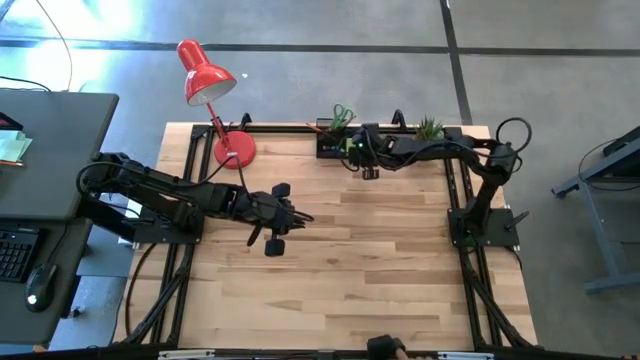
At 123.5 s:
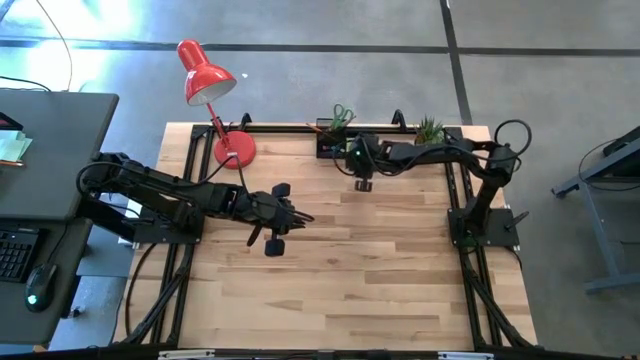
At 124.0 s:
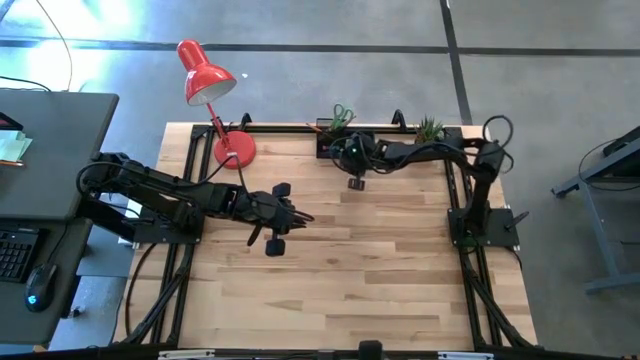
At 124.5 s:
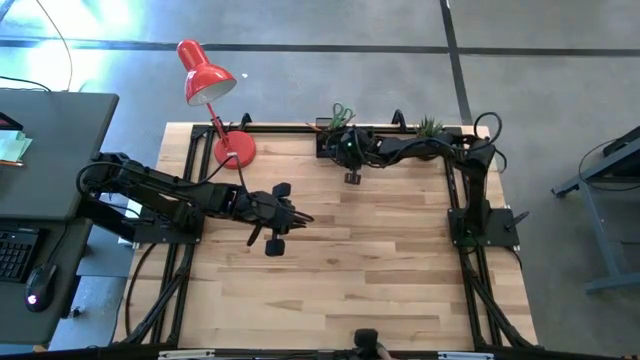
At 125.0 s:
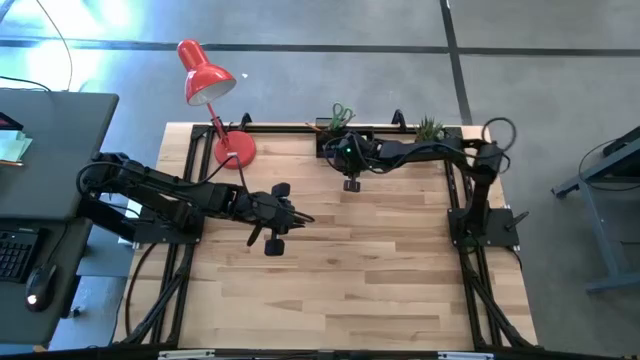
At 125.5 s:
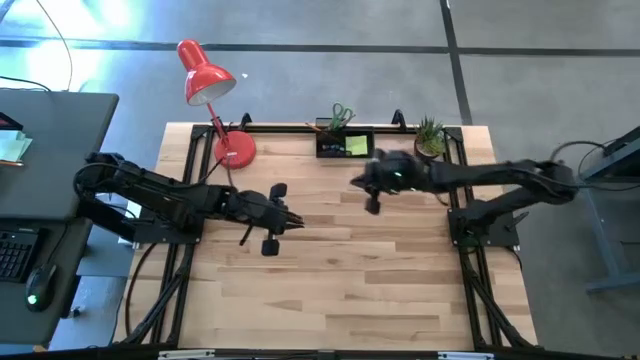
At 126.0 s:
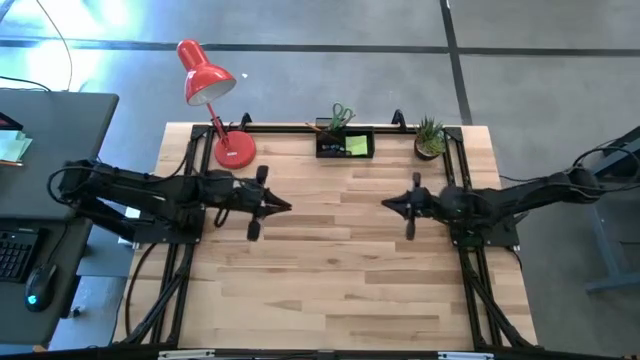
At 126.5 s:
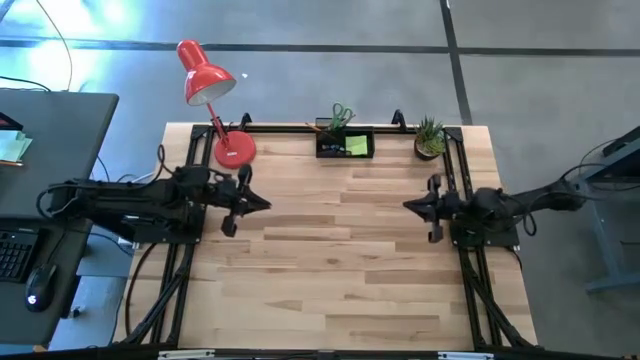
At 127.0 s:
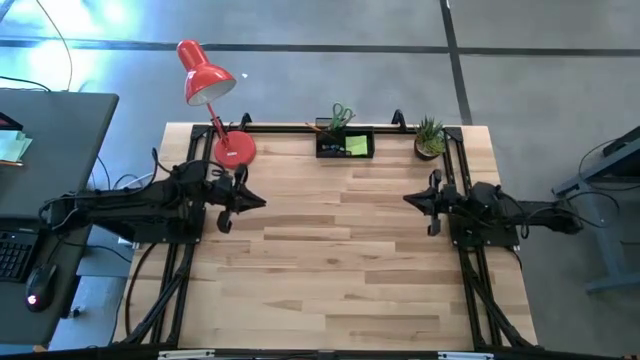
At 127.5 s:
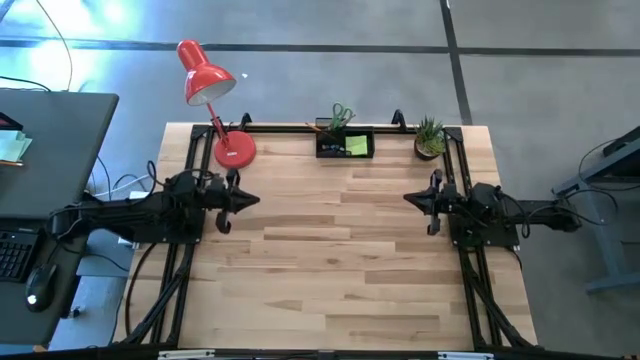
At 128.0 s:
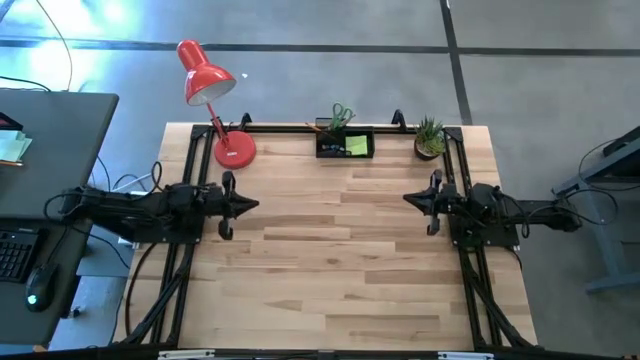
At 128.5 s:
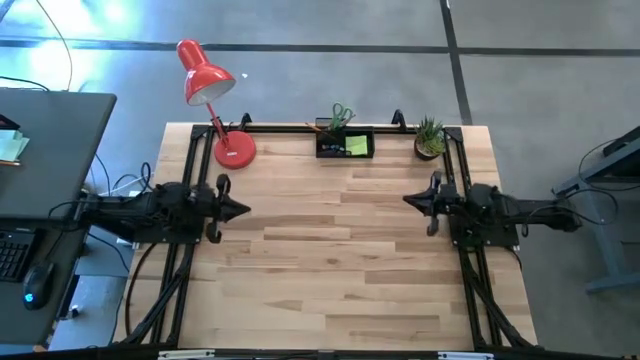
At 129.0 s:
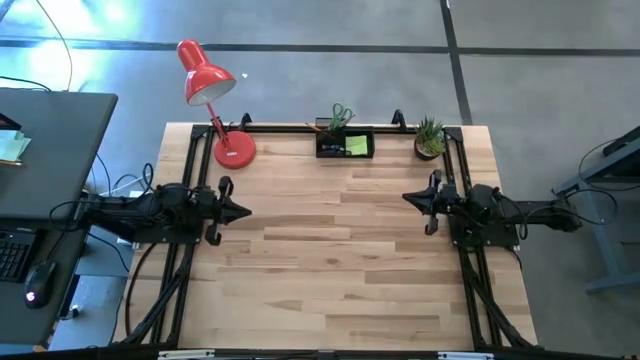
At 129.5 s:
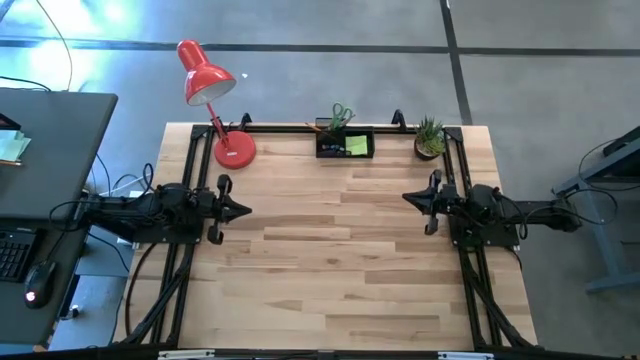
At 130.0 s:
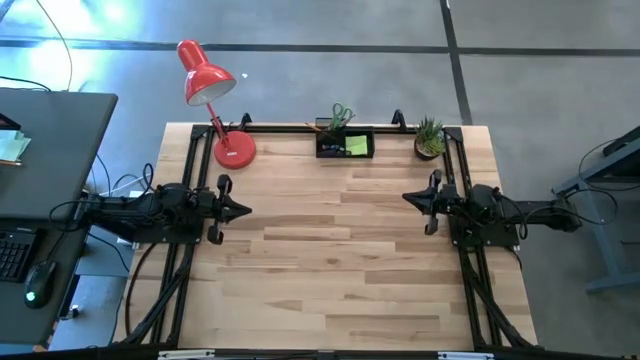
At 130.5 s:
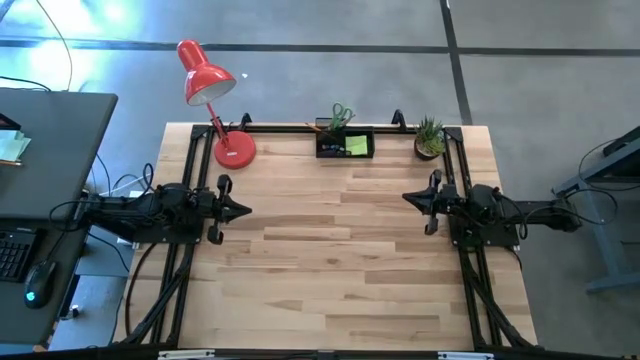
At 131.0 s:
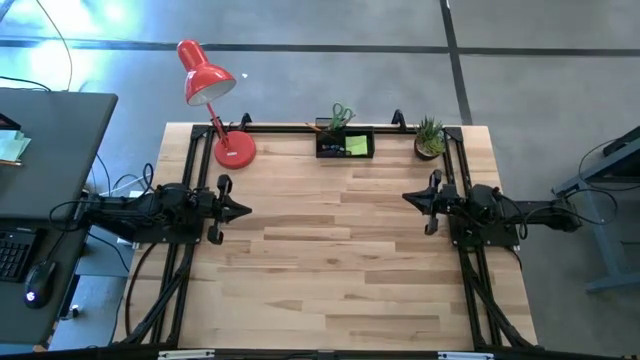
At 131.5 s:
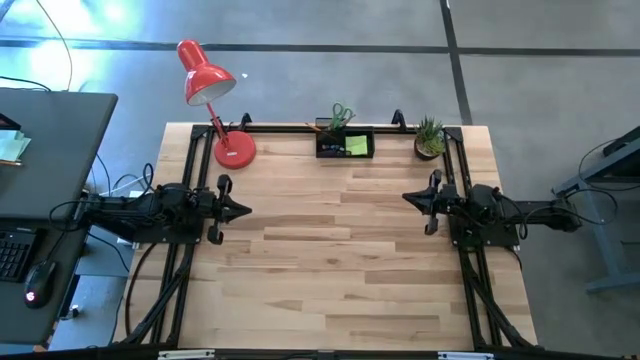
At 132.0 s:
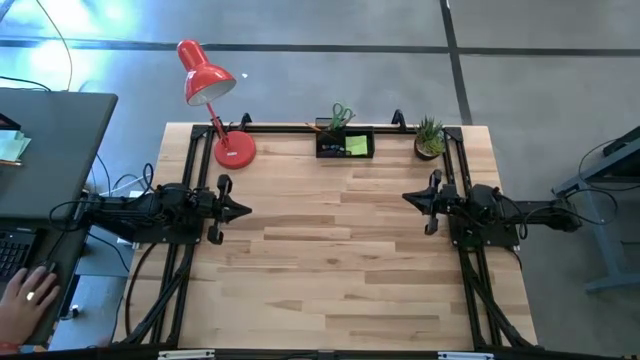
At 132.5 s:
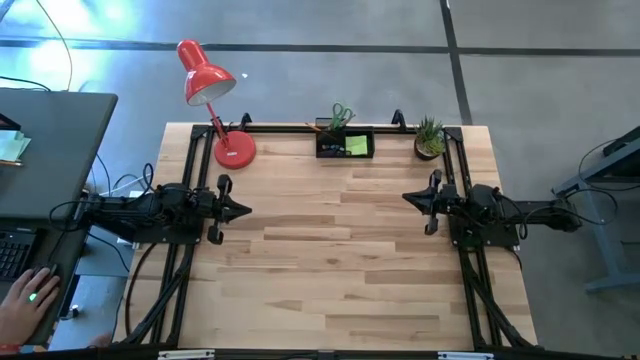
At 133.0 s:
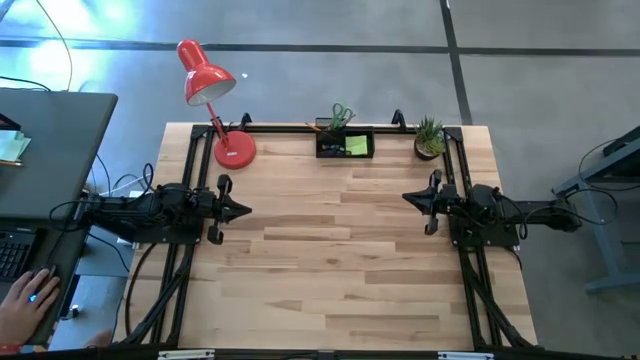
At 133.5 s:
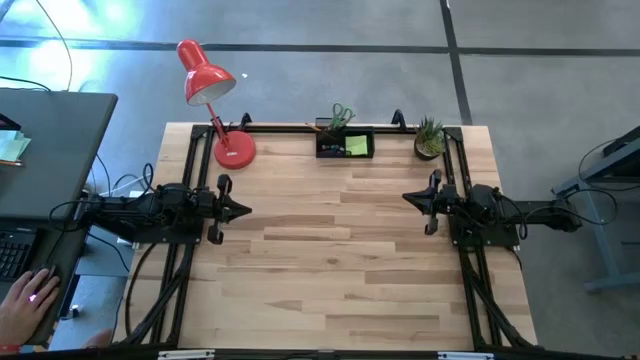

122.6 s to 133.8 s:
Task: Pick and place office supplies into organizer
Return to Home Position

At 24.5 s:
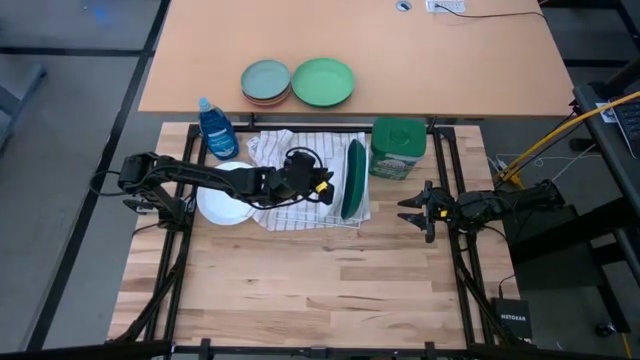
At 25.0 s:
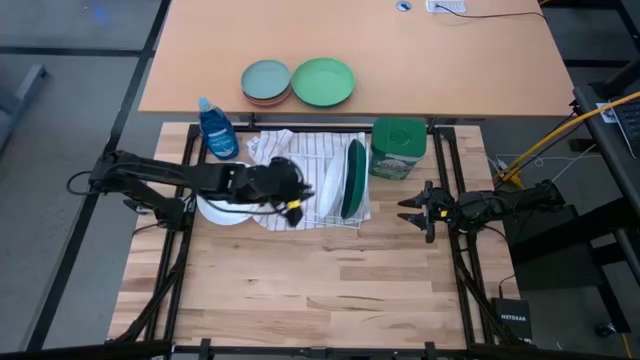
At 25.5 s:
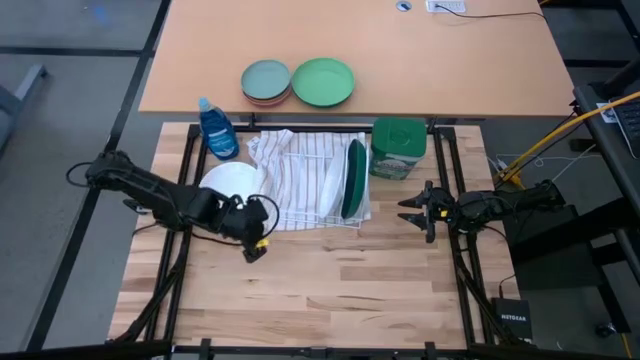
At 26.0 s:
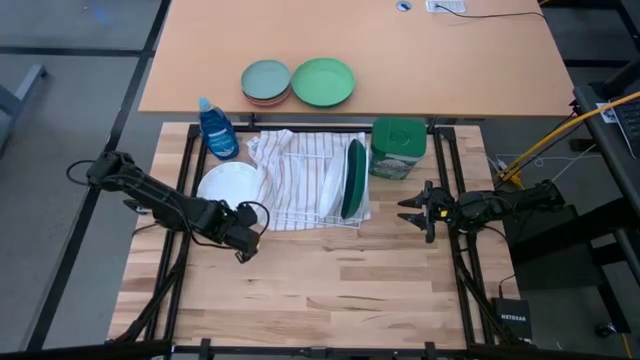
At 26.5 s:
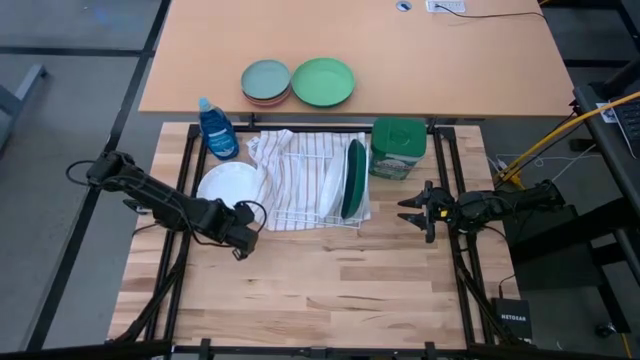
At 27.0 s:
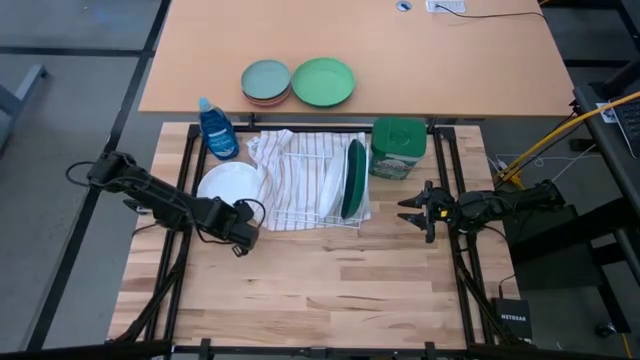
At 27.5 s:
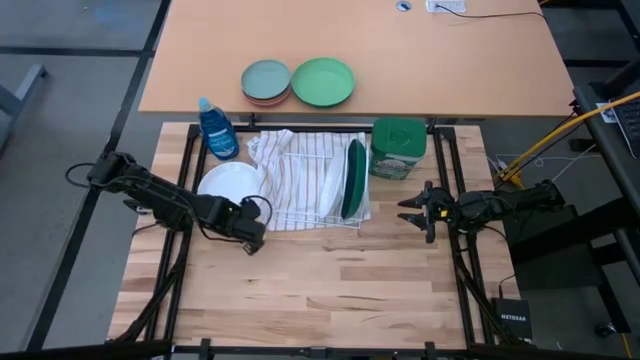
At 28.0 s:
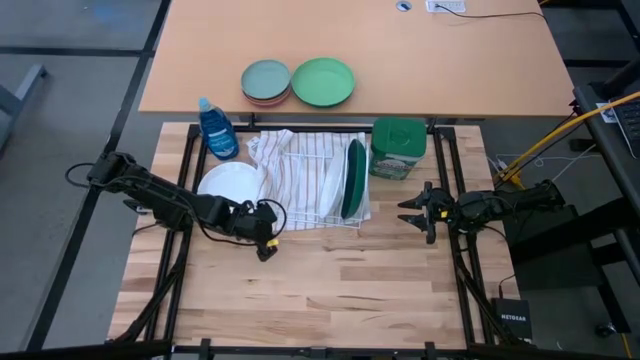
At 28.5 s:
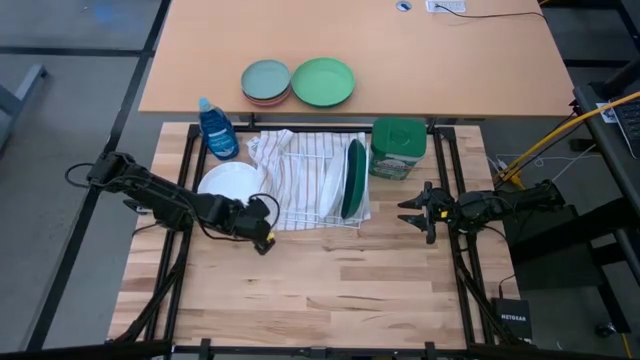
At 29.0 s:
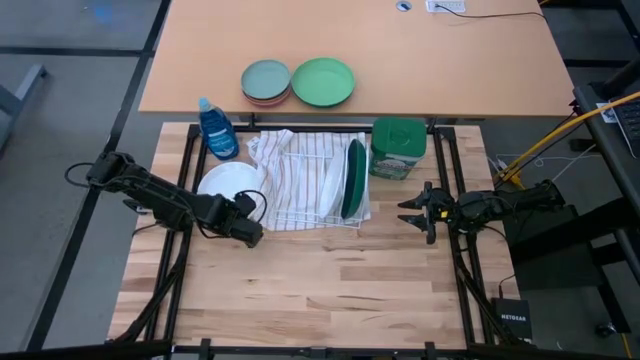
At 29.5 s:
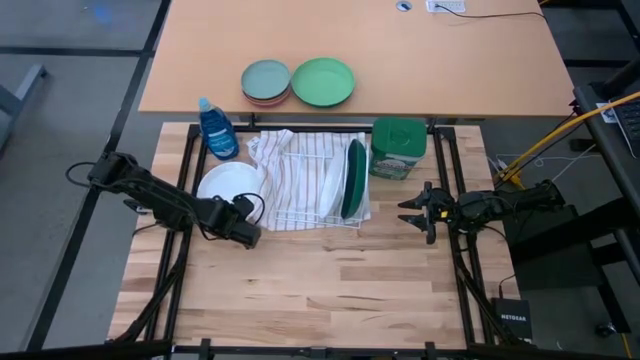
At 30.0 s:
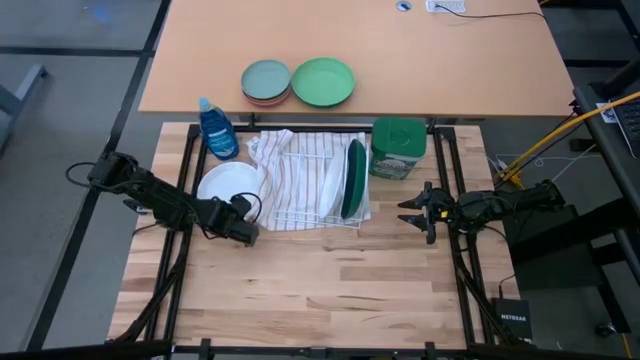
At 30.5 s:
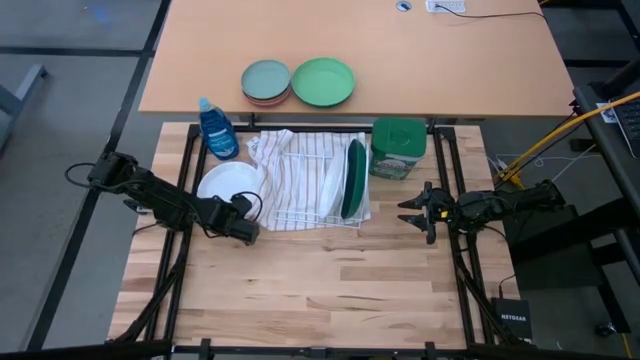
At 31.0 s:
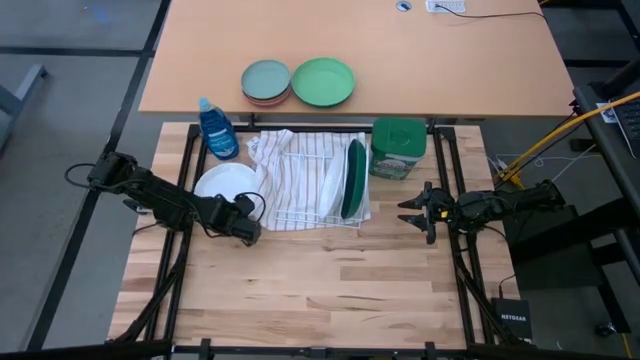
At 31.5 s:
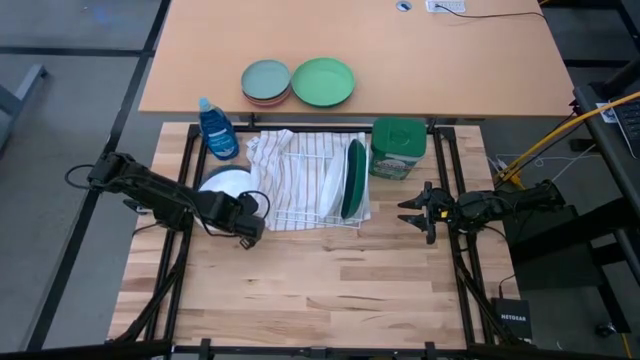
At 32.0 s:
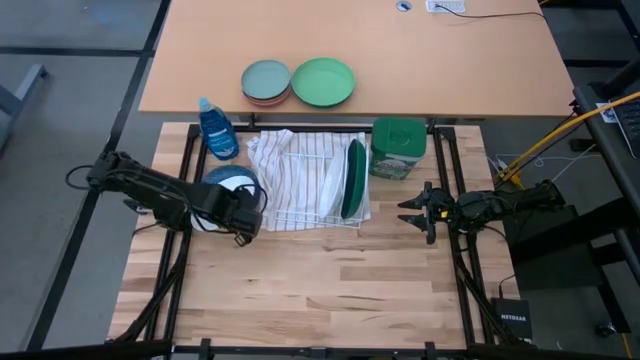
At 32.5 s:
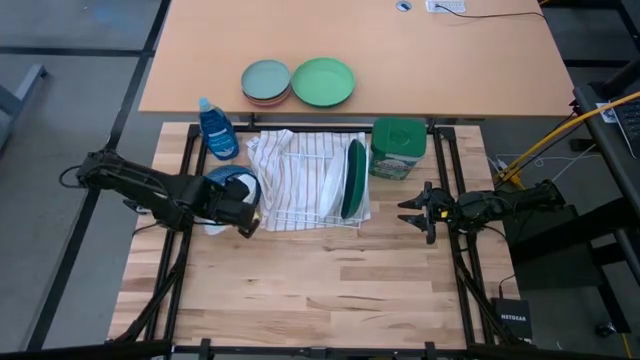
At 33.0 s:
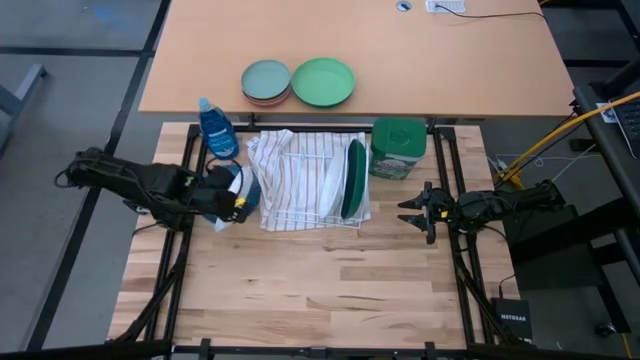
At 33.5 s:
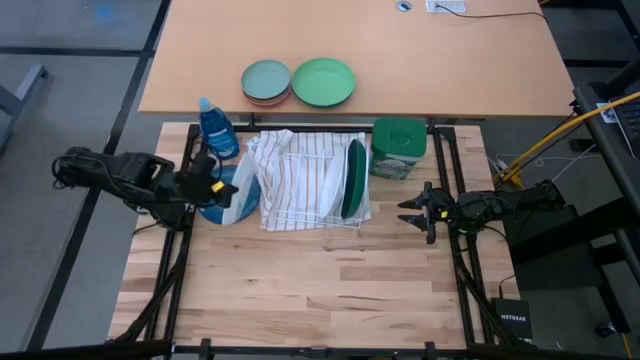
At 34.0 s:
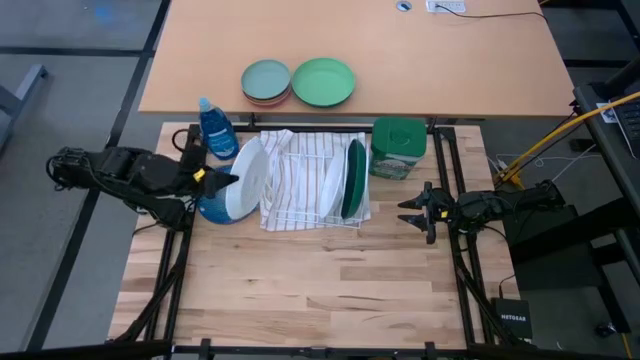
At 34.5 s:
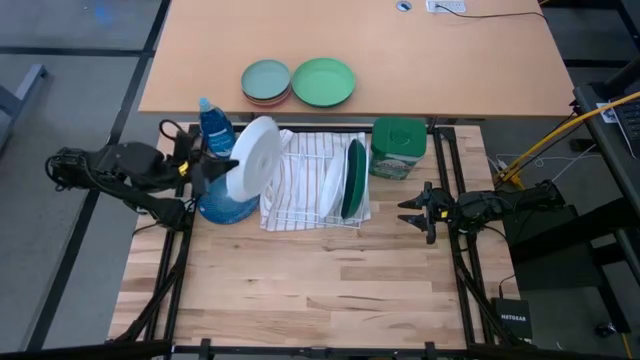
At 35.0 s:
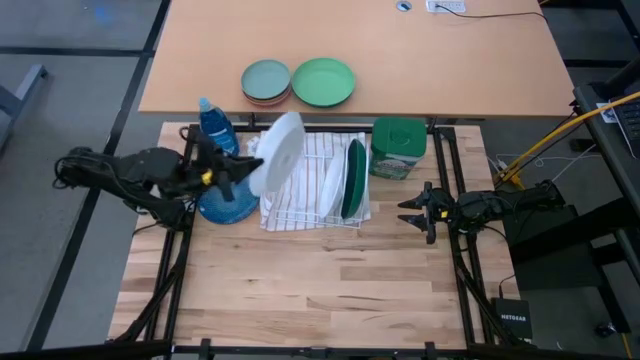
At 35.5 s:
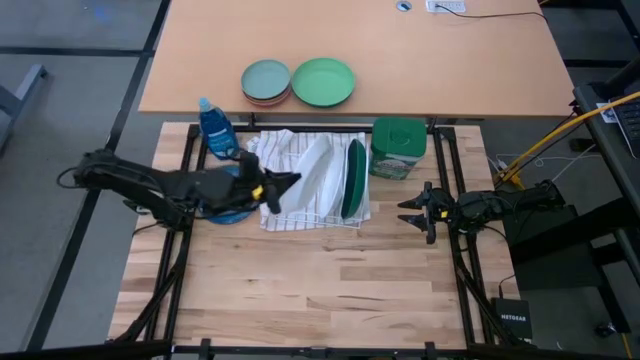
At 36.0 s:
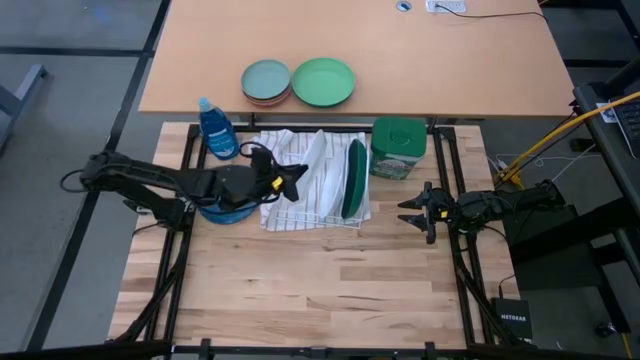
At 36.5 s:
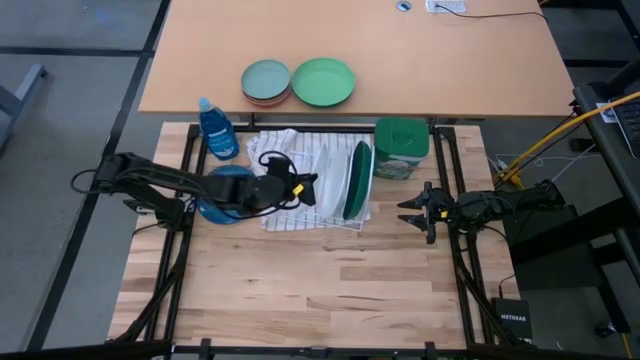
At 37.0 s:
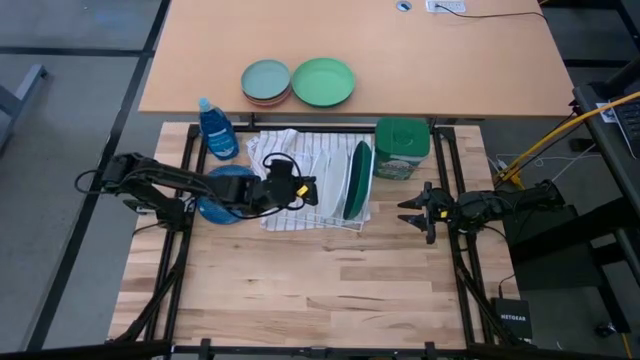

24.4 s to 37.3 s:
Task: Sort dishes
Put the white plate into the dish rack
